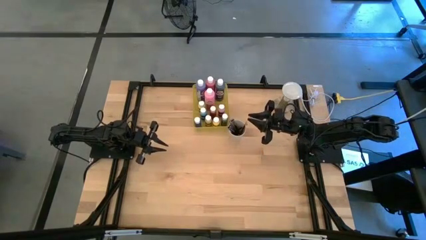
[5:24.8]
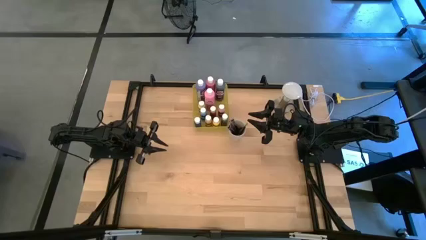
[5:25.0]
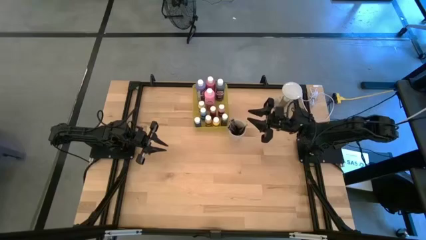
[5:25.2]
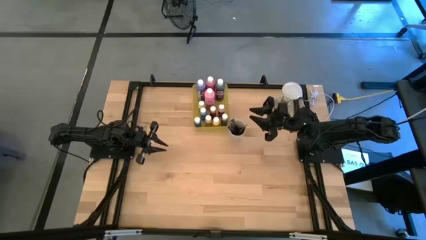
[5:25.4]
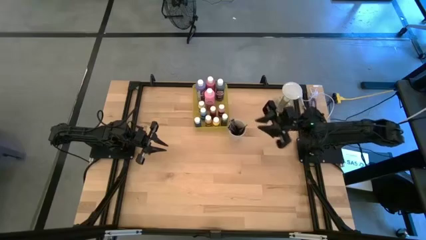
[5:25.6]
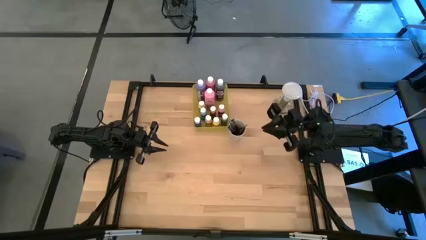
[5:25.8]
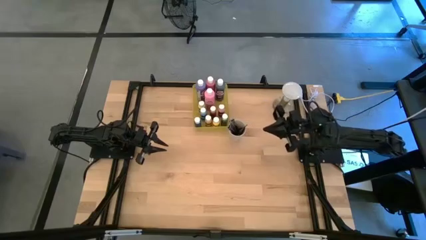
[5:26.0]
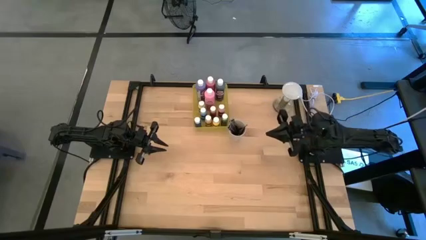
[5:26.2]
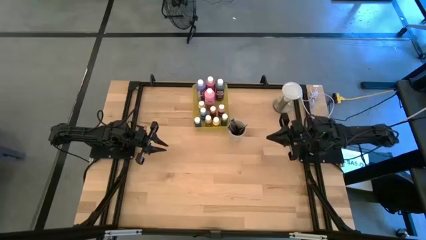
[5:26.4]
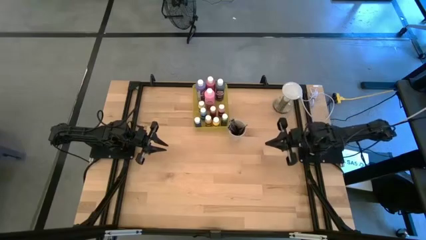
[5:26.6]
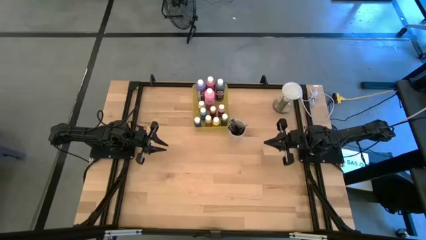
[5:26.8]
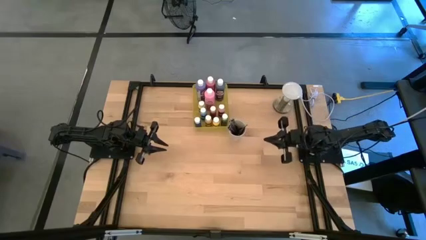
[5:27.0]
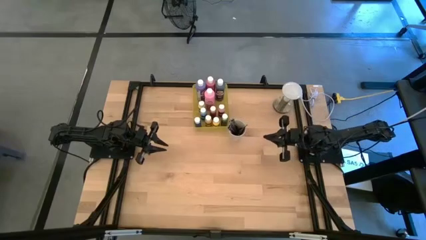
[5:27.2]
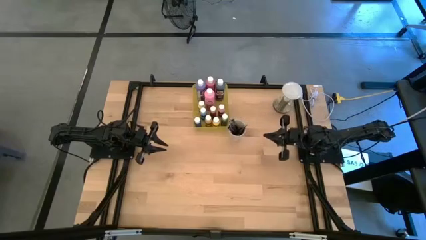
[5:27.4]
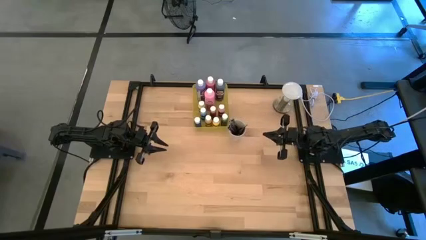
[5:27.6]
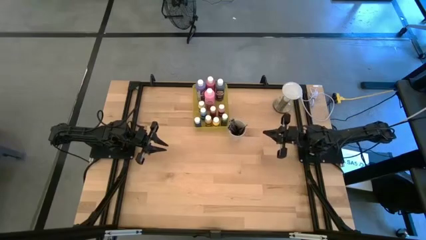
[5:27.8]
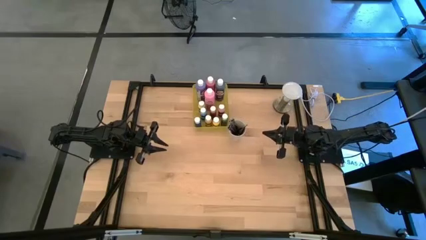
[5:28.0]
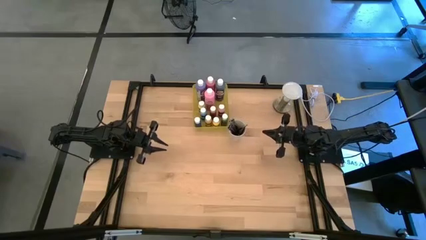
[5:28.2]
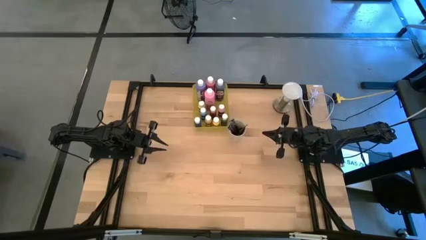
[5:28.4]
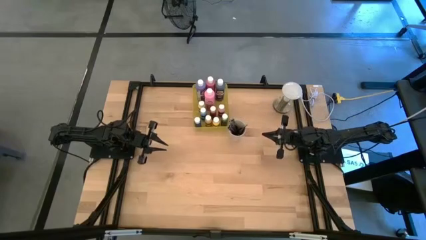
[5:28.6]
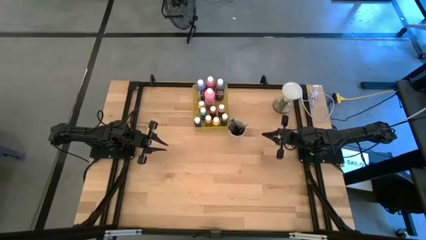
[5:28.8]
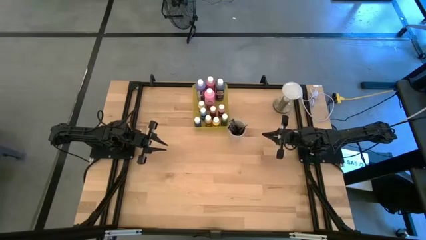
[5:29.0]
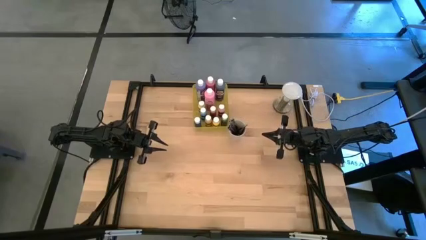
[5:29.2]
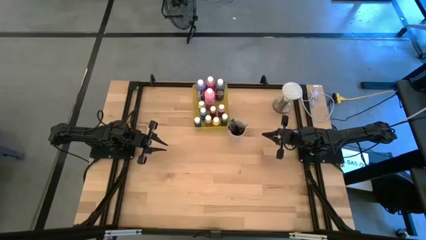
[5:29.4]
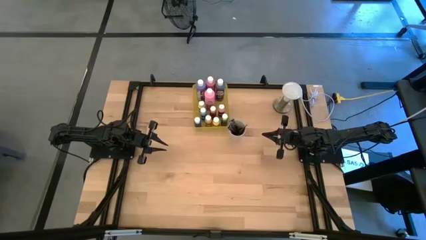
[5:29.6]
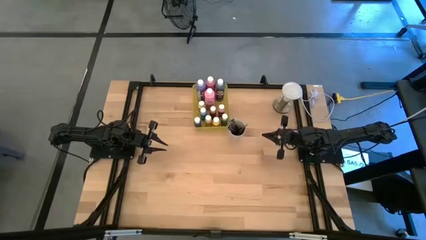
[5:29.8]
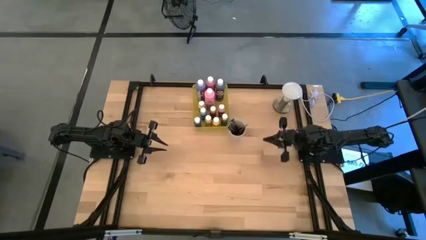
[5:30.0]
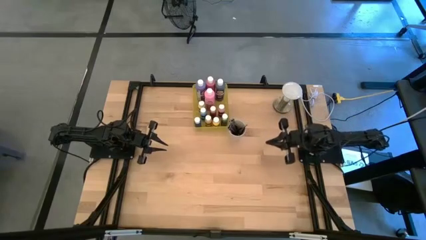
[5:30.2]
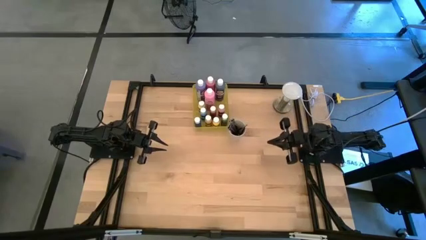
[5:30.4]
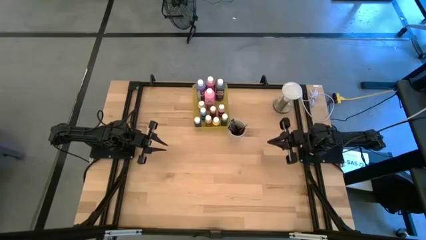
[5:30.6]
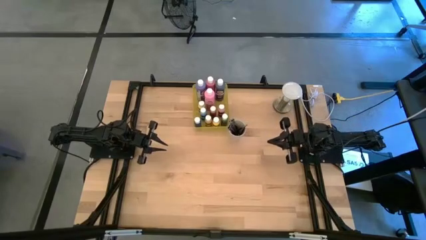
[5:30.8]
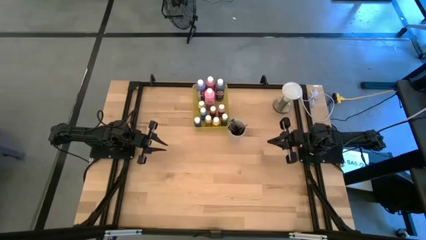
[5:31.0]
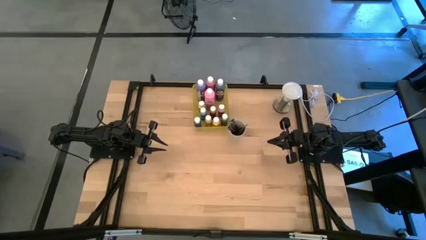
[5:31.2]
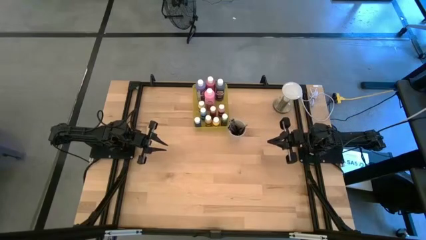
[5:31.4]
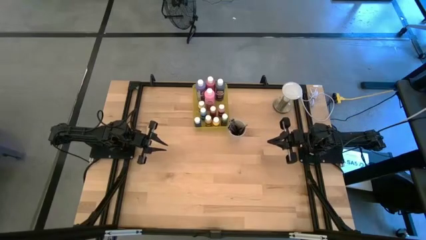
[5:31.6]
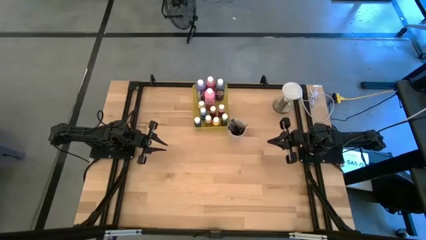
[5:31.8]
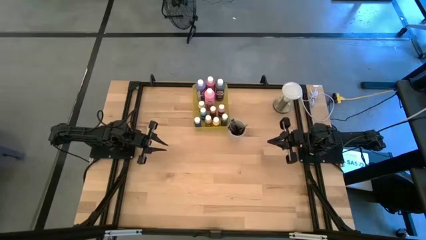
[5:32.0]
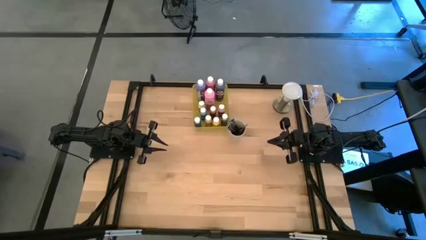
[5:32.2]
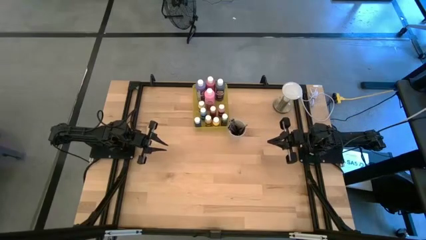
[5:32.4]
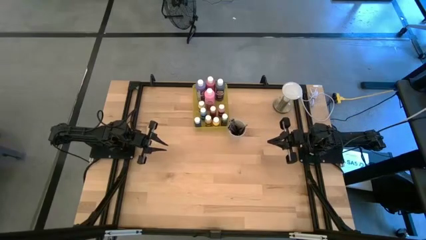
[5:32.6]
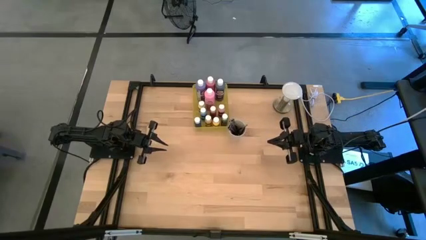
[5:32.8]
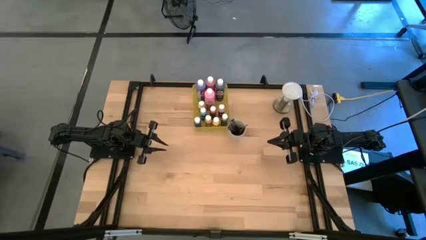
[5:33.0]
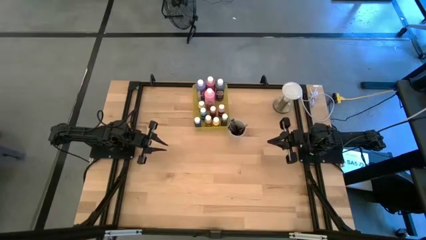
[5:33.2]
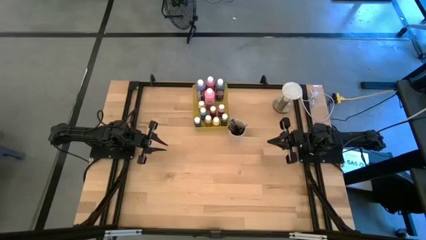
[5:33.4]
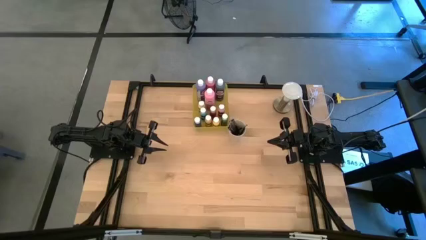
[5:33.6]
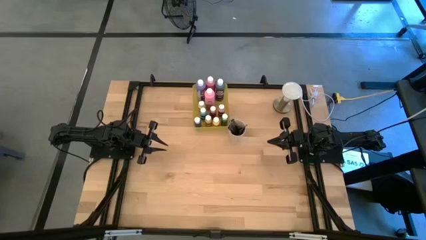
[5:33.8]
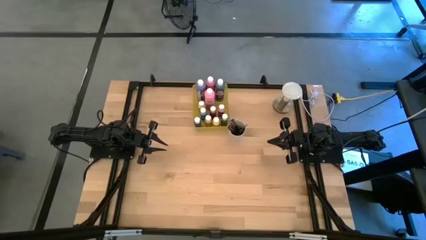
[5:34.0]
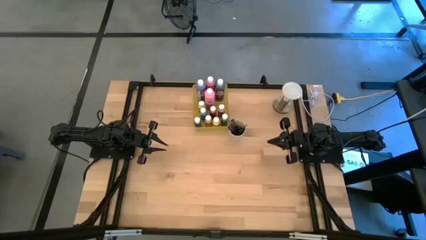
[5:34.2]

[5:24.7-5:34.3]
Task: Pick & Place Paint Supplies
Return to Home Position

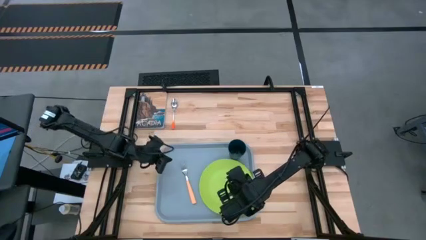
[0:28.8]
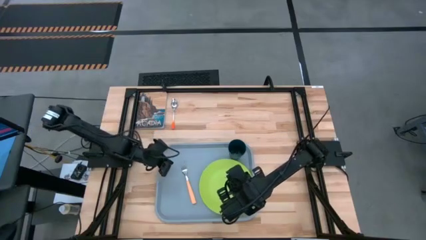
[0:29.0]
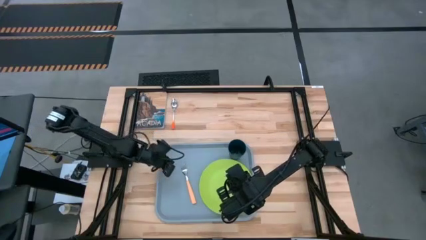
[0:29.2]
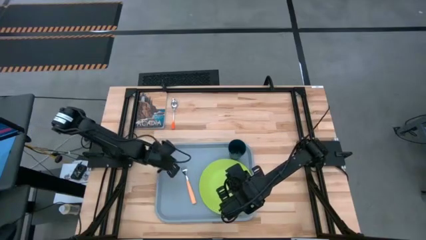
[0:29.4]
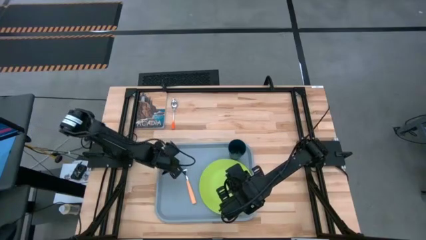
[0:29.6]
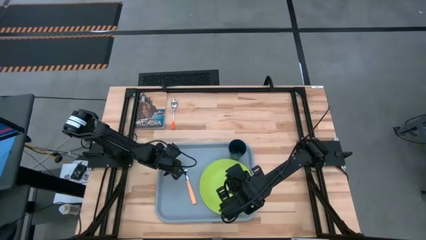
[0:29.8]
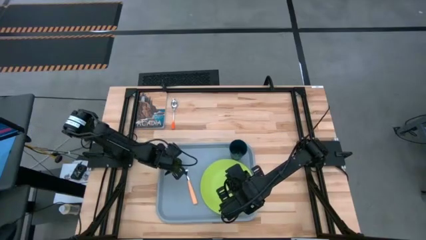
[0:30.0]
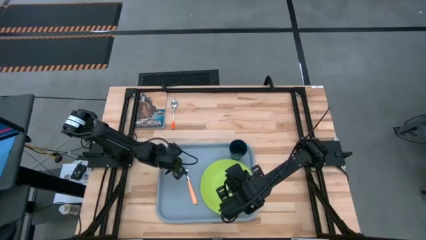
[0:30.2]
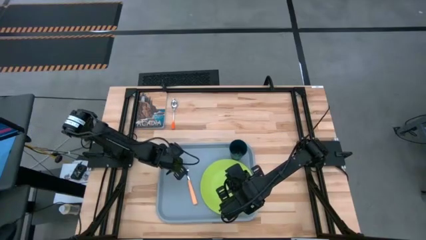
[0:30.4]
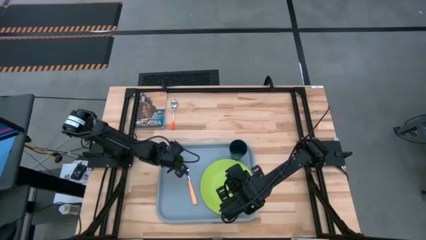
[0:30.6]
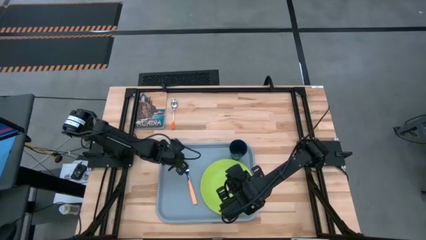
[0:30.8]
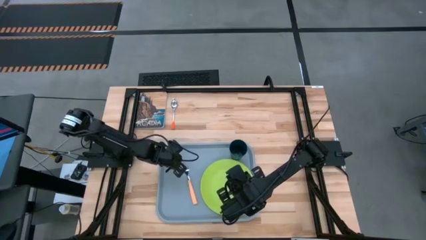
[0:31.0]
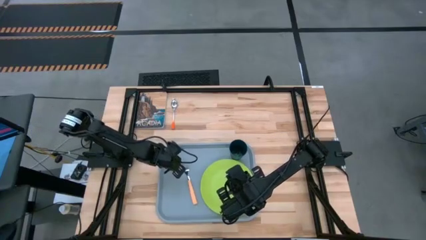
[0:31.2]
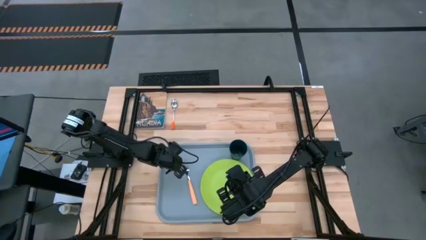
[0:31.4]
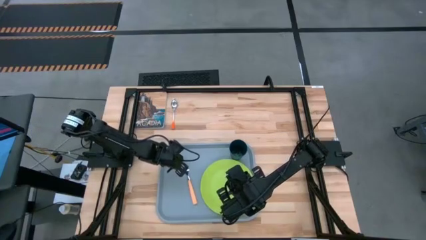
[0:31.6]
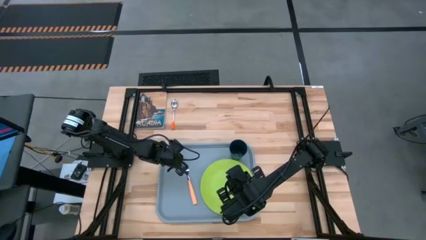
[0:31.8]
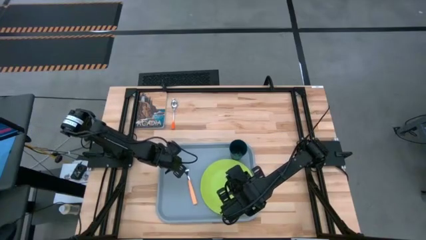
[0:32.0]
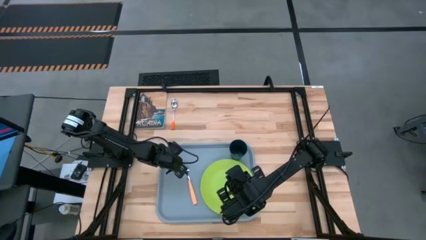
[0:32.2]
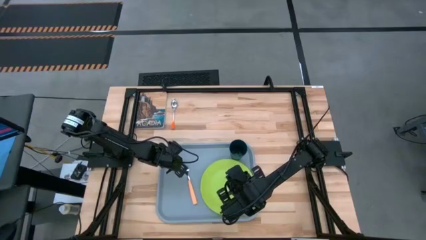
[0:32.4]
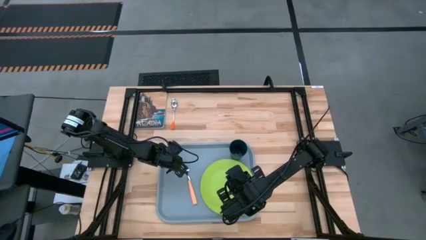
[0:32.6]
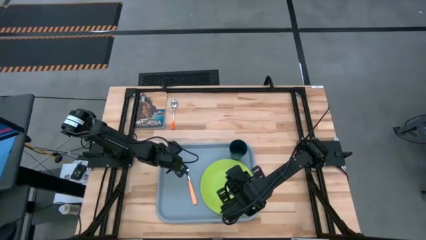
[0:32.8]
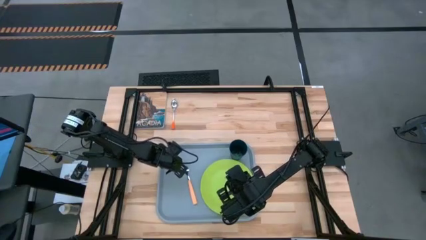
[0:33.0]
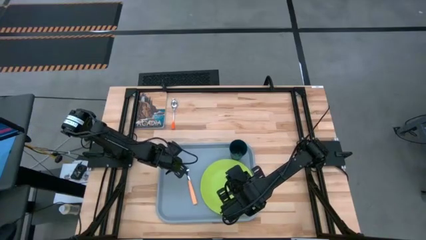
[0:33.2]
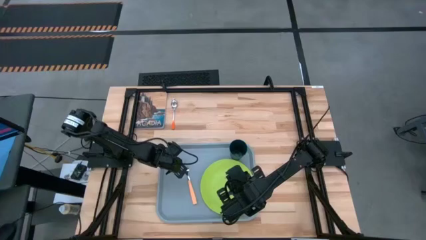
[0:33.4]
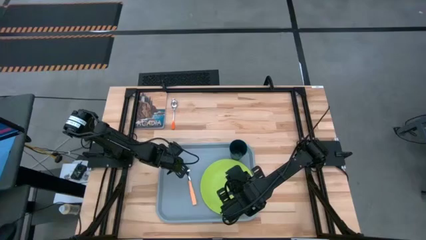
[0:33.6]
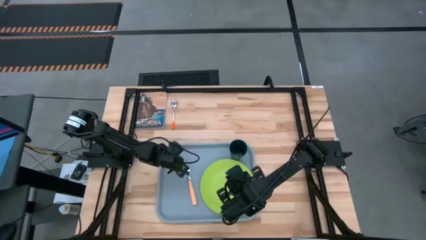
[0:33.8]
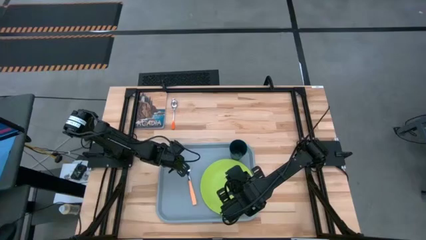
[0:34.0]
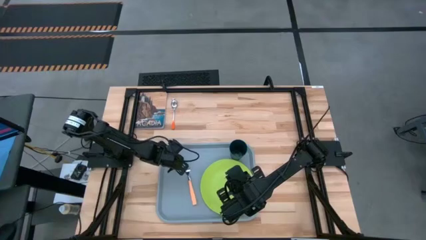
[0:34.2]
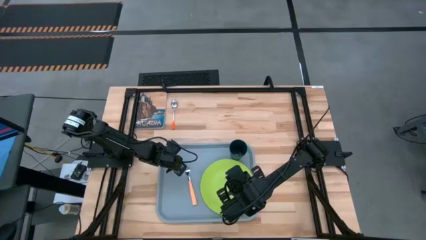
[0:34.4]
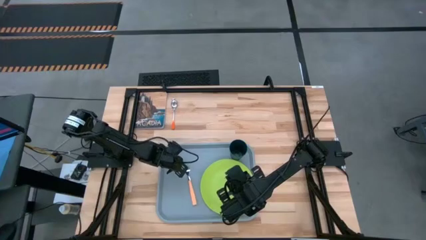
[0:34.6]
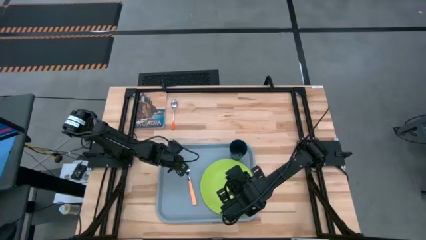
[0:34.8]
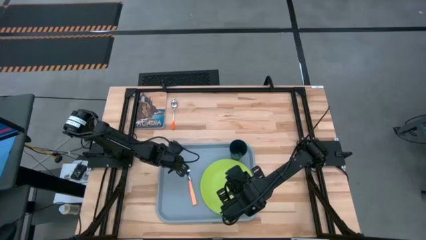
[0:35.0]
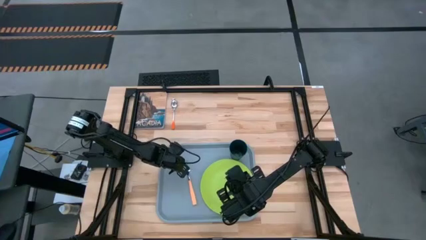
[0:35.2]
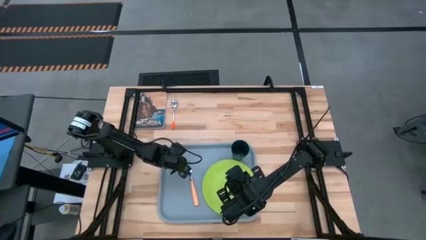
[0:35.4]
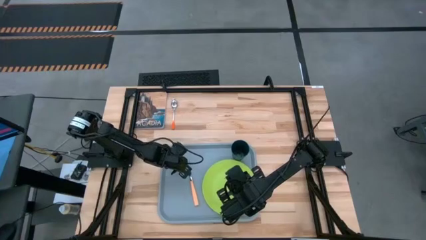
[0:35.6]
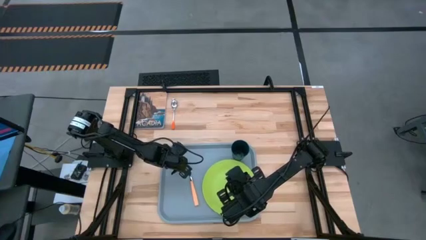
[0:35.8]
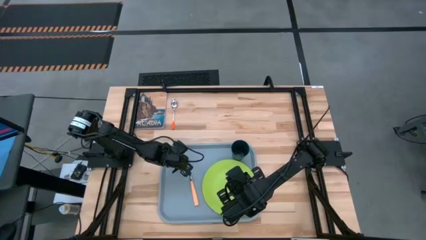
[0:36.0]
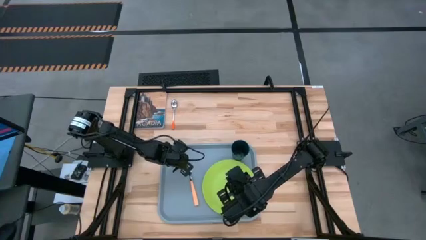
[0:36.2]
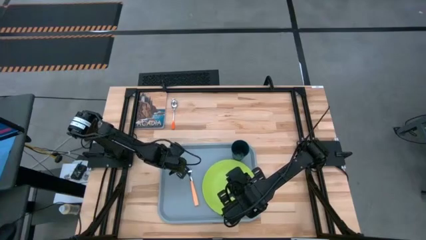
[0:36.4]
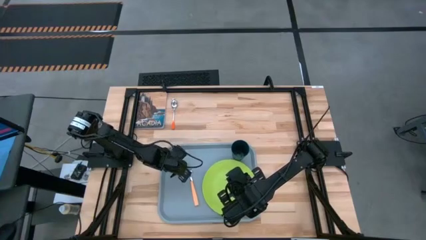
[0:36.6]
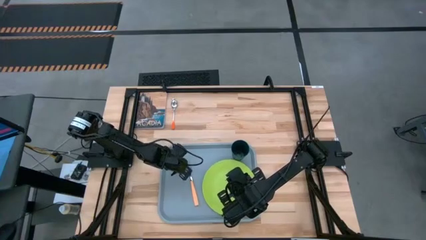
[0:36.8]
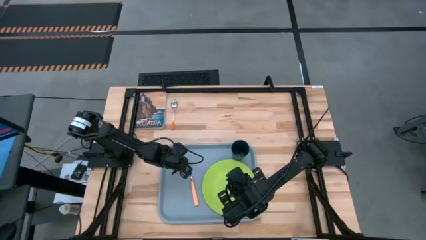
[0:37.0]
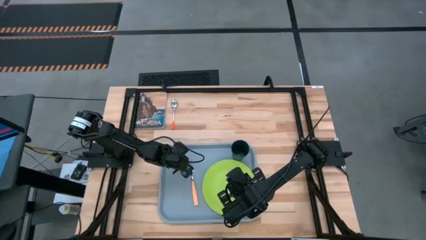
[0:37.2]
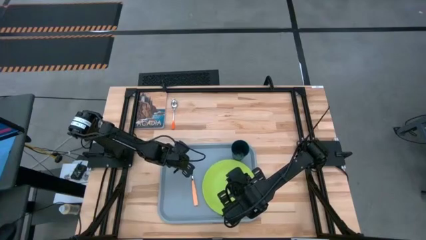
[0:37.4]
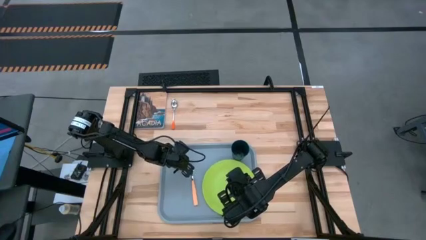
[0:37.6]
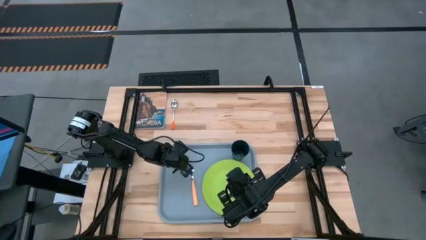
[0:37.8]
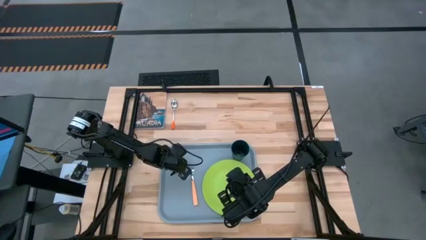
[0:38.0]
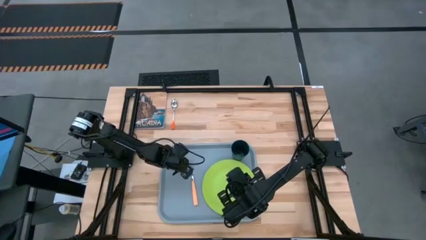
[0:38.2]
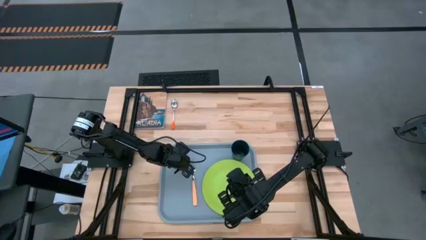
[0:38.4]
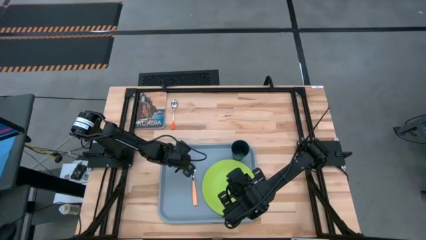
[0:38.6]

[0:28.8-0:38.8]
Task: Pick and place plate/cup/fork/spoon on tray
Put the yellow fork on the blue tray to the left of the green plate
